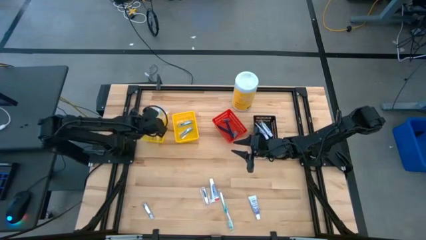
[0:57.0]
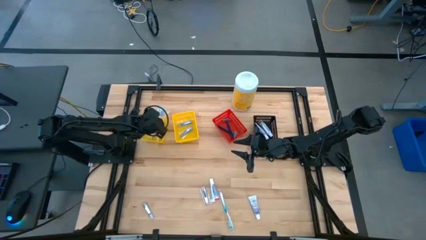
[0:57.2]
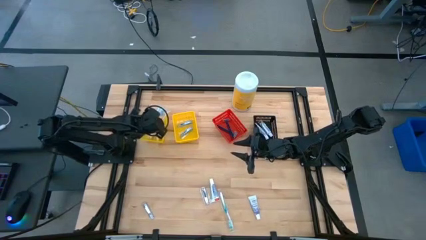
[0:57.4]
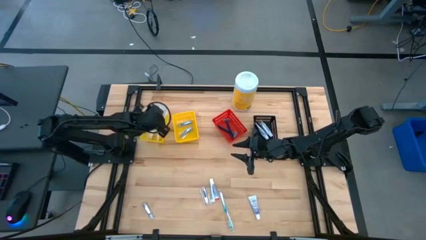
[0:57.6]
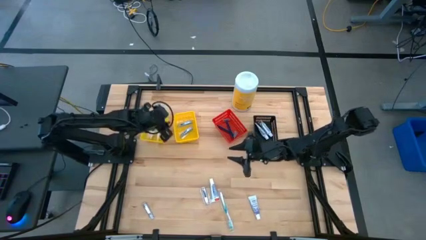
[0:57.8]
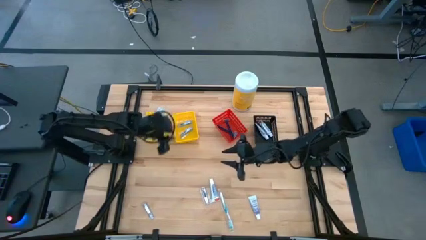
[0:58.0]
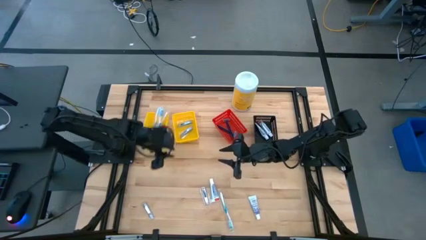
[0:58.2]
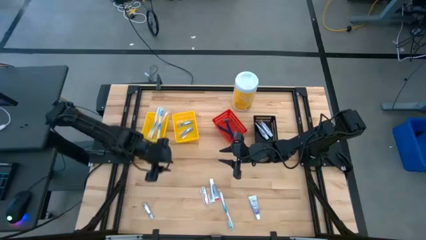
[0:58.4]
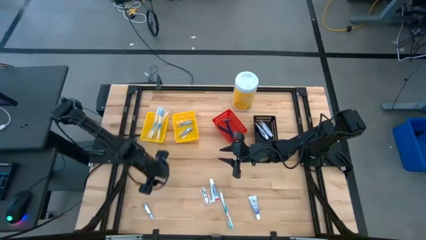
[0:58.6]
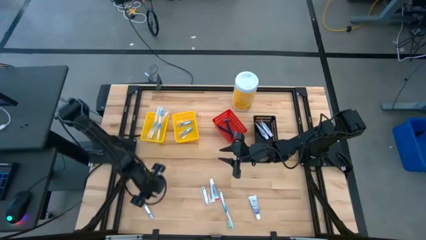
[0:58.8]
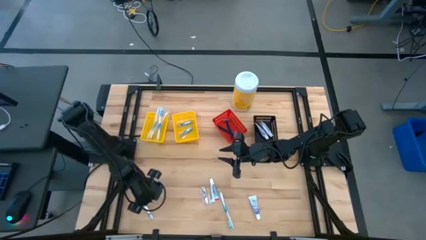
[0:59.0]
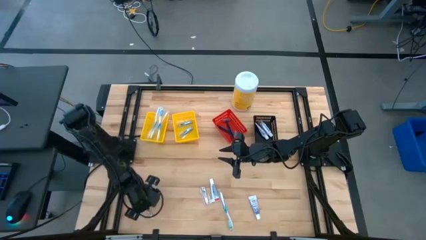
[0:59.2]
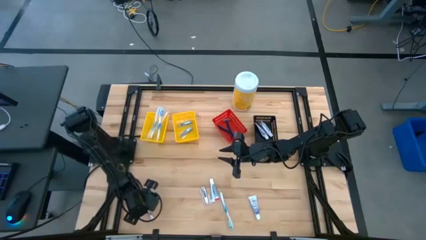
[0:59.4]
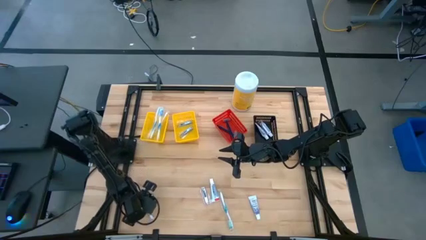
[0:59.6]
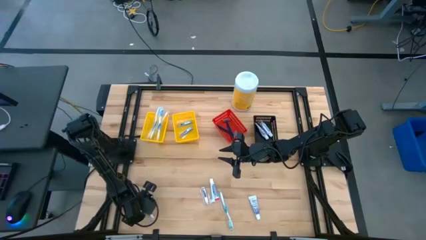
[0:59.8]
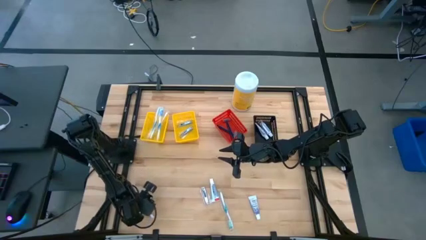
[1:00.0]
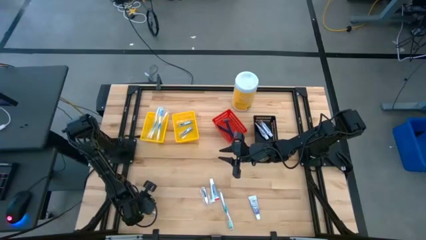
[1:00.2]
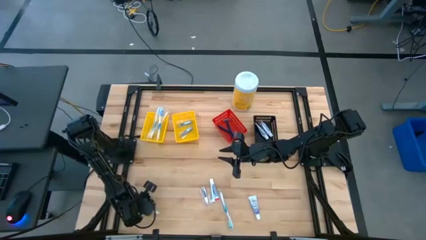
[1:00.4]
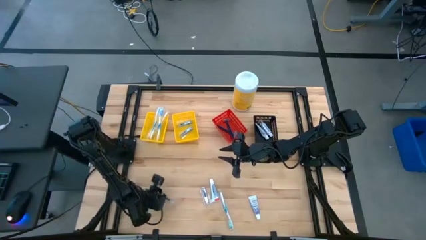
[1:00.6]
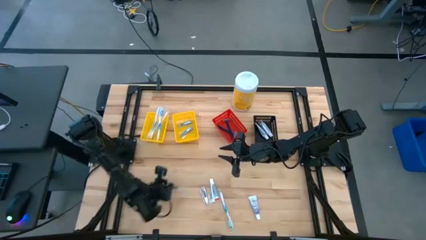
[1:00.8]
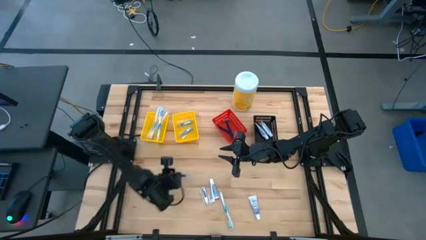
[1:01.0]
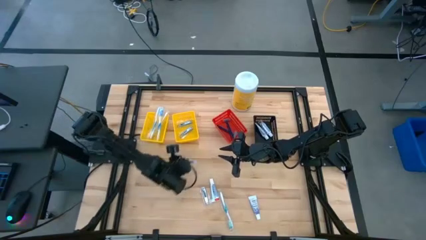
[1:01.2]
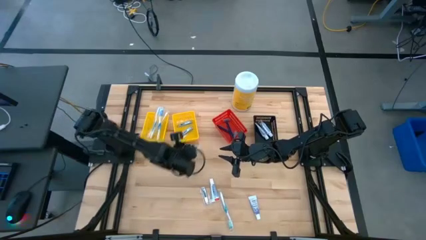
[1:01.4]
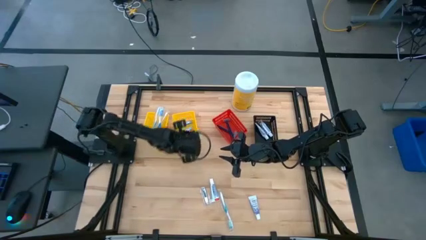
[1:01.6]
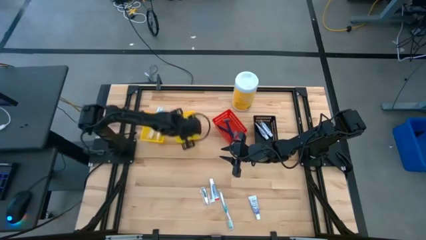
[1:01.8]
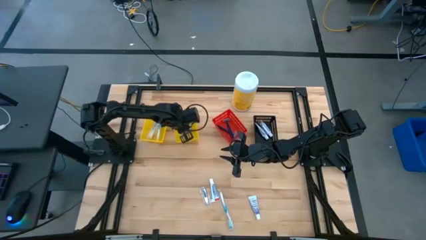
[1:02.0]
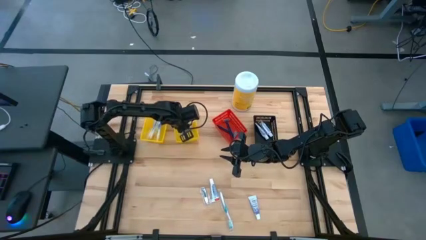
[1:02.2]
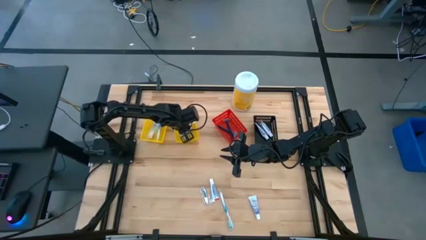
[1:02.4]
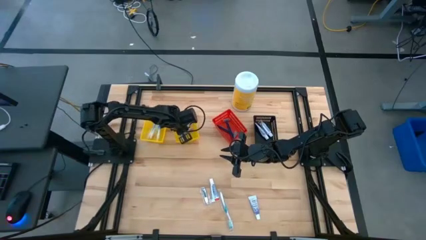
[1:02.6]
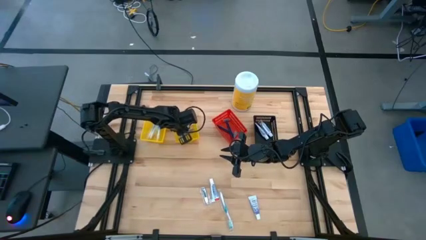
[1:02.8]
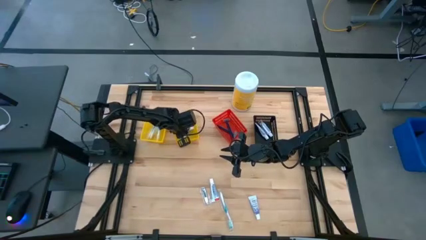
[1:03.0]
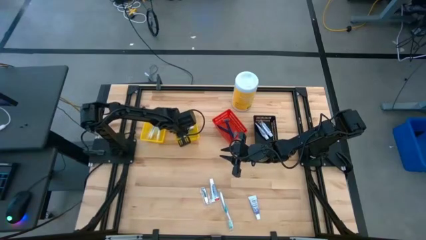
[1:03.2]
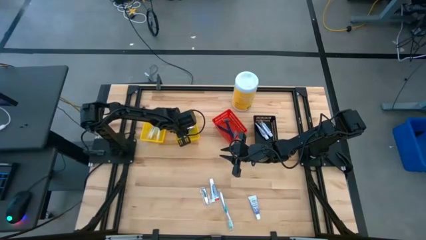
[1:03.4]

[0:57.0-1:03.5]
Task: Pick & Place Travel size toiletries
Put the silver nail cutter into the right yellow bin

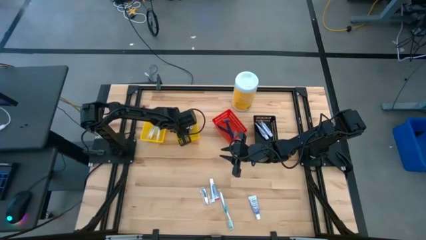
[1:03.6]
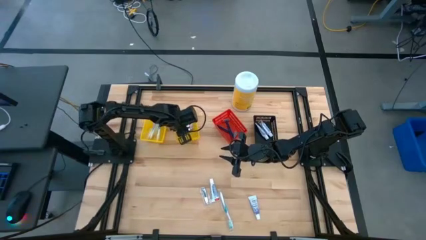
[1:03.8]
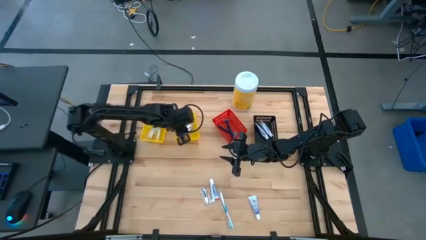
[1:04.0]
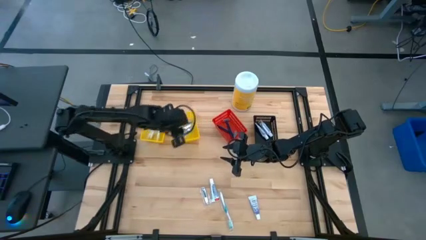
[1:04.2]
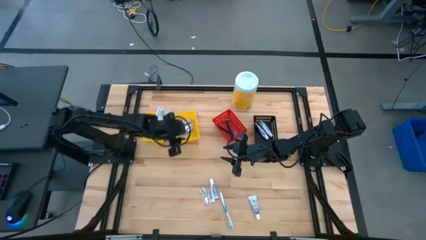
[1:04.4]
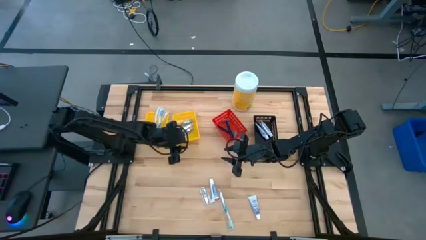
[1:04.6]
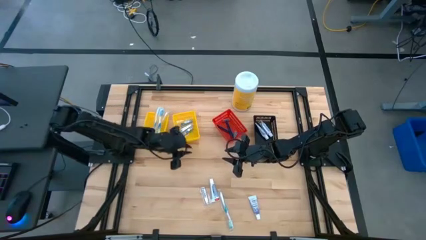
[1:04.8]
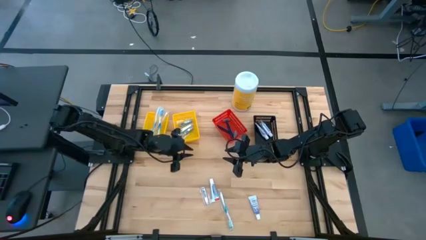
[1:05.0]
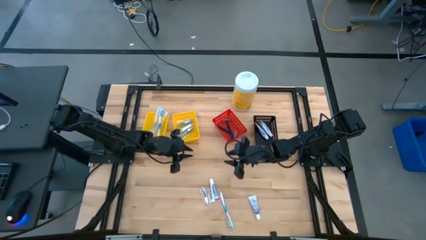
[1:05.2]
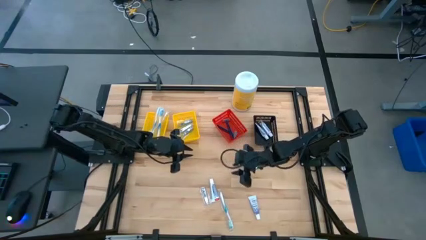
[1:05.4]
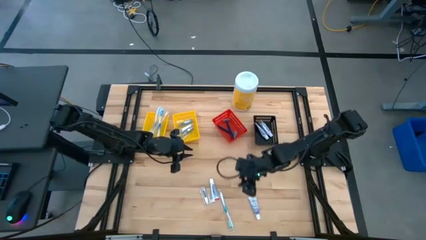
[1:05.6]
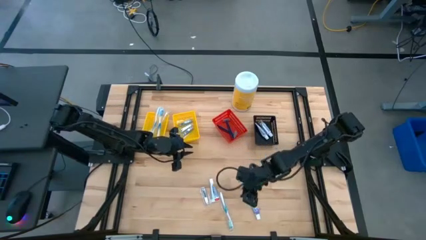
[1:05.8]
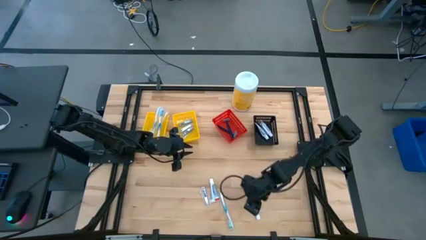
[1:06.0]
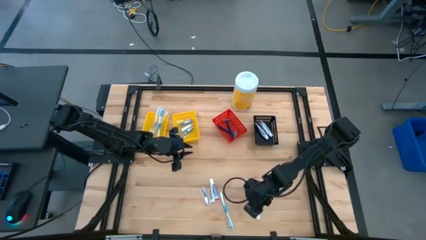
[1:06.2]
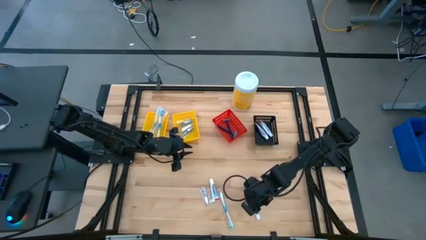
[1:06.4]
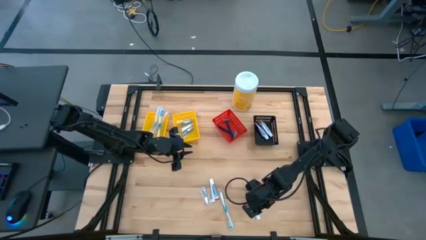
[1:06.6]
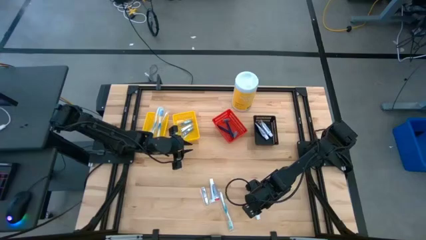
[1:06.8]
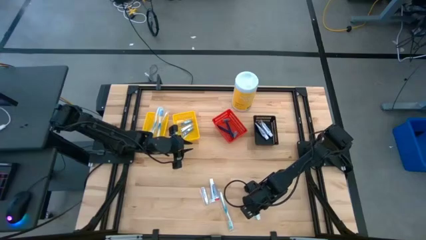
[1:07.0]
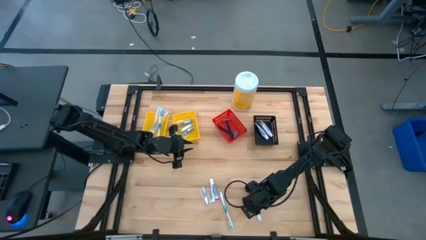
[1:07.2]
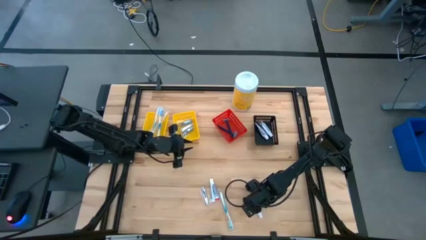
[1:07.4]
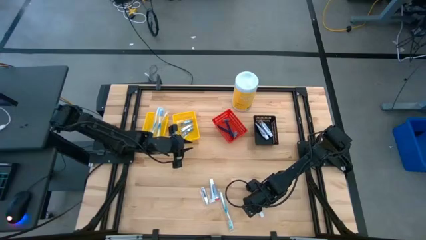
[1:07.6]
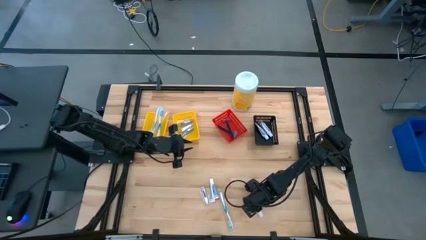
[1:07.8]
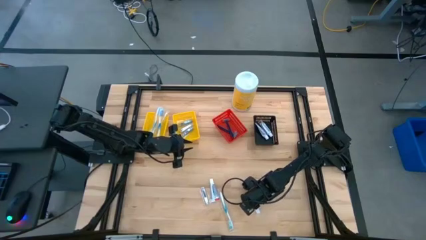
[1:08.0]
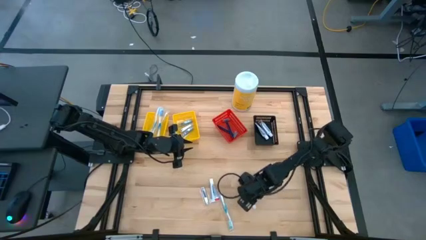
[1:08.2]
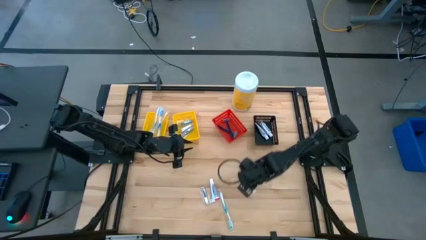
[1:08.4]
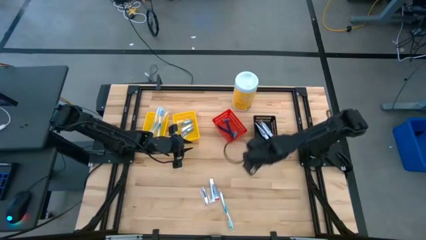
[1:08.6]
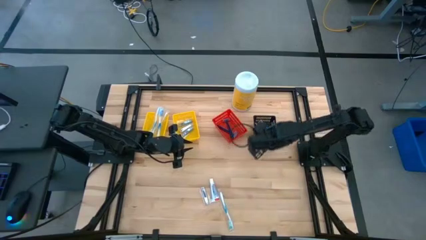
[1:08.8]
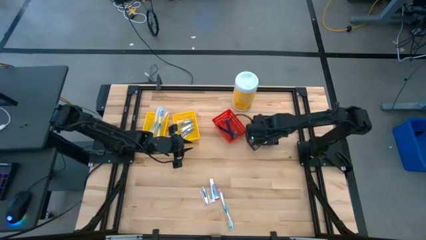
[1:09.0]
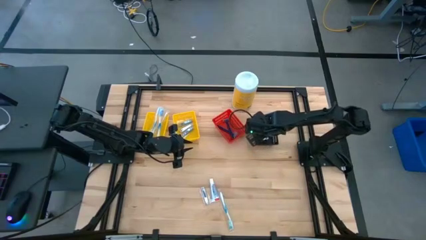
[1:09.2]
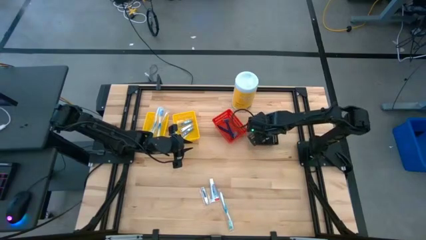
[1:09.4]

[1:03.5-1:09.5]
Put the white toothpaste into the black bin

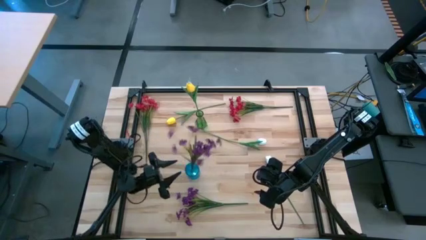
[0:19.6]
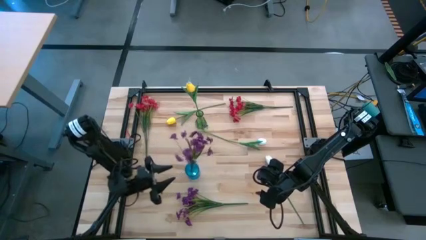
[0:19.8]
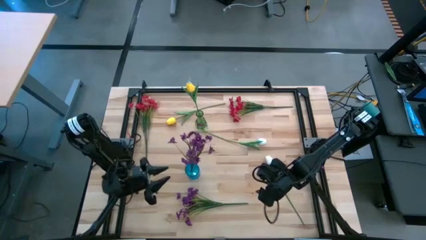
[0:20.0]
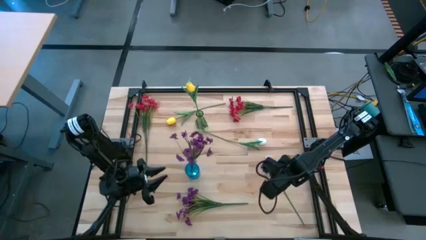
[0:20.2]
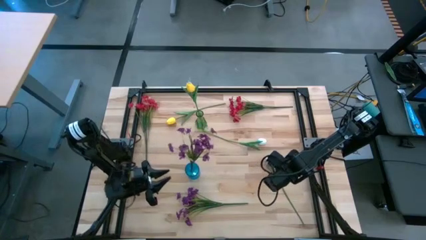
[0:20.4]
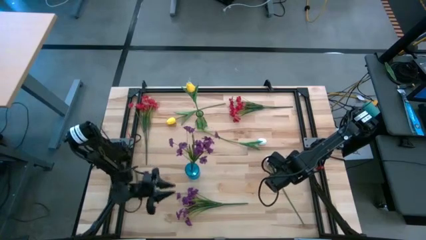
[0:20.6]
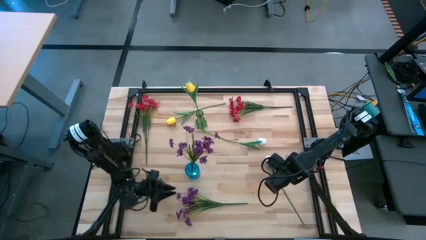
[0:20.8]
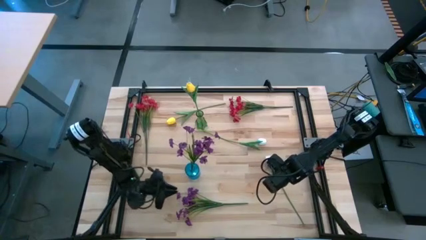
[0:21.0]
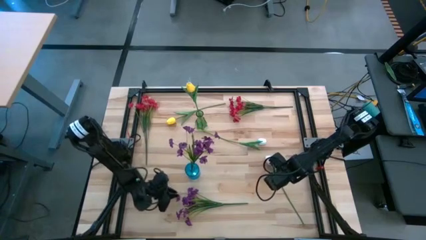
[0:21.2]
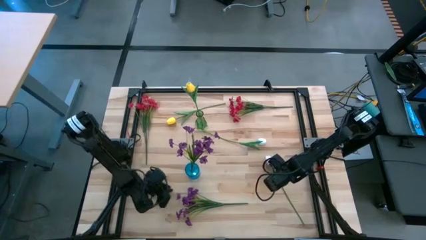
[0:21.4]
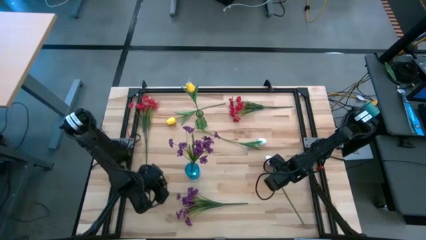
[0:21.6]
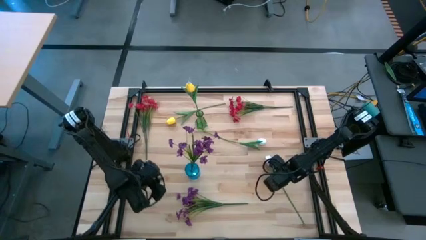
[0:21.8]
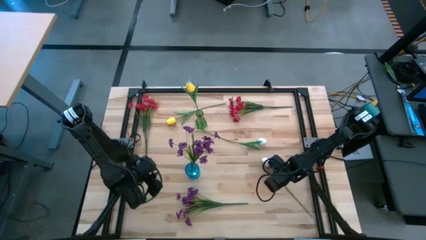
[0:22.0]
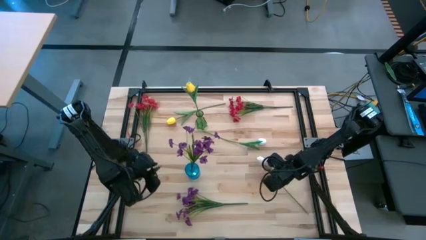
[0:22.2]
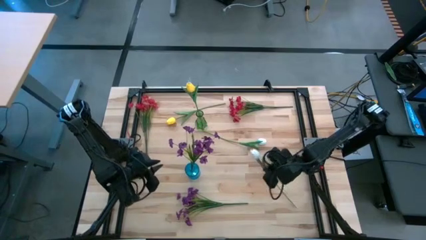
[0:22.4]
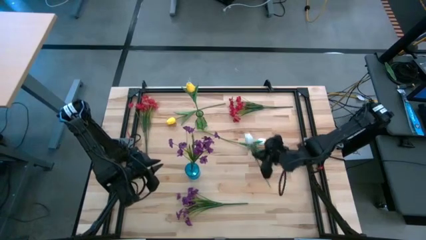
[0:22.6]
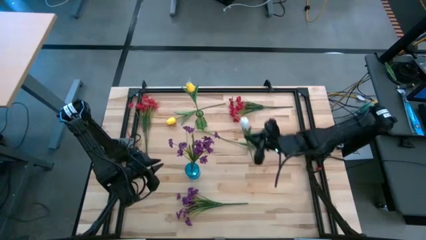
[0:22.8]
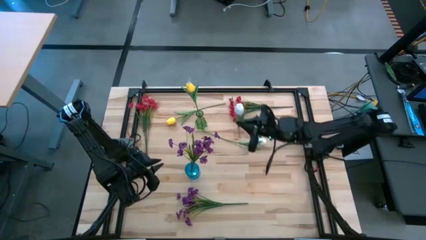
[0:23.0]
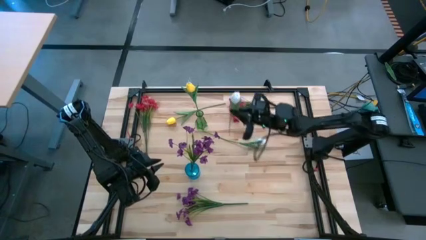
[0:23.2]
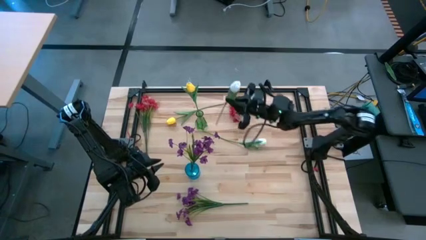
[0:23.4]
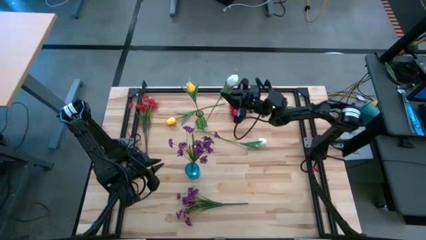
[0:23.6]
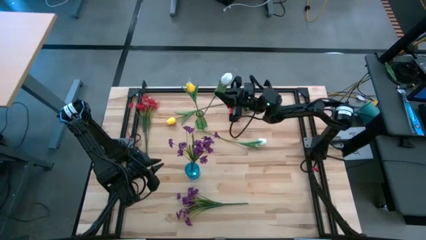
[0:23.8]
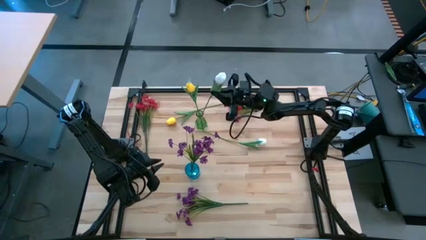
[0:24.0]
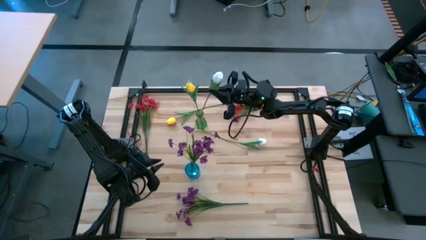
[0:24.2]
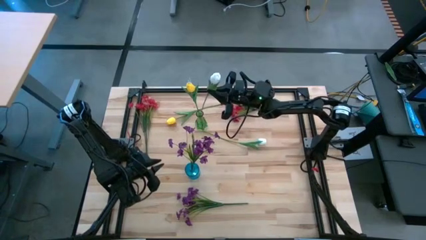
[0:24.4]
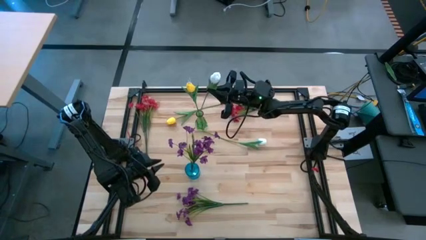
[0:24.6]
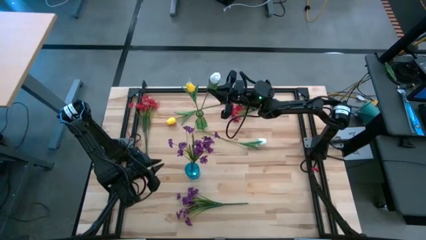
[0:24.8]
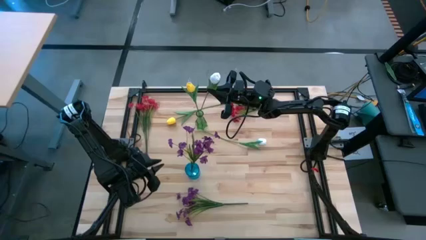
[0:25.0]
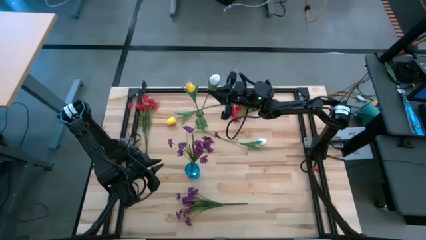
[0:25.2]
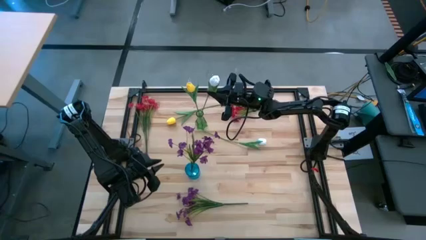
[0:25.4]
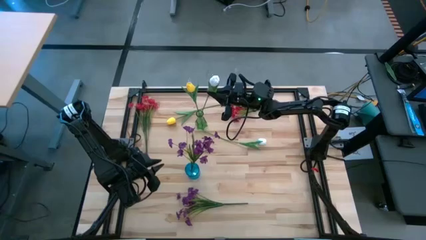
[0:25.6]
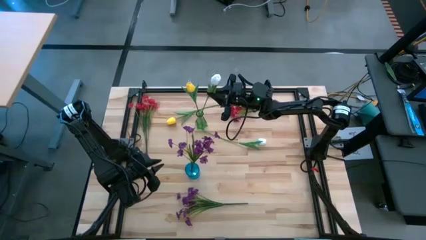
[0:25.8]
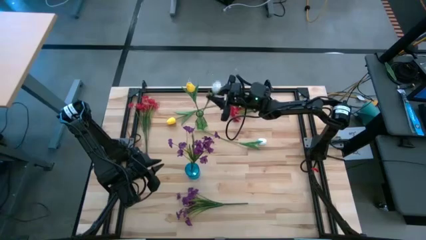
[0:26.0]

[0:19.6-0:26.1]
Task: Sort flowers into vase by color
Put the bottom white flower into the green vase
